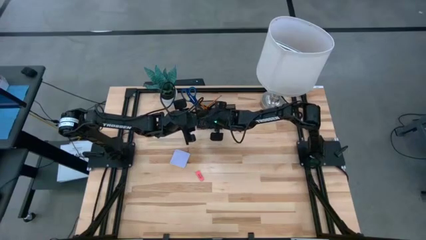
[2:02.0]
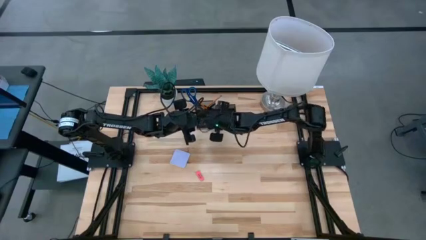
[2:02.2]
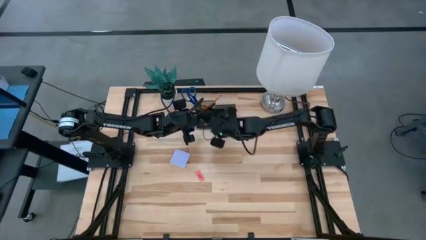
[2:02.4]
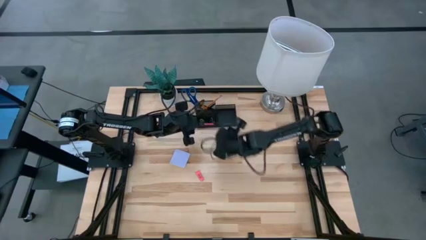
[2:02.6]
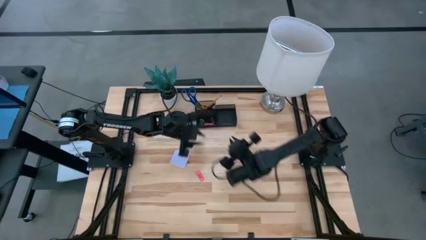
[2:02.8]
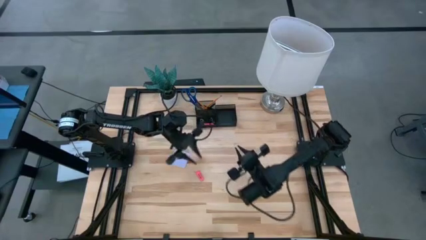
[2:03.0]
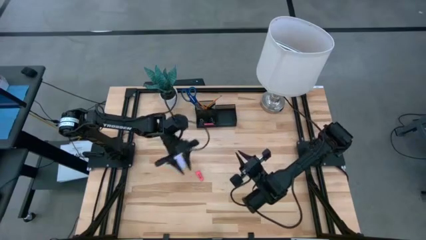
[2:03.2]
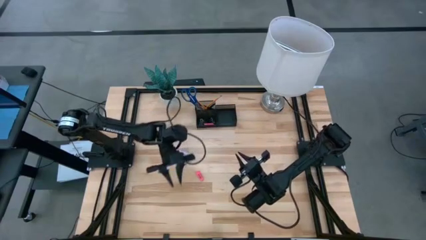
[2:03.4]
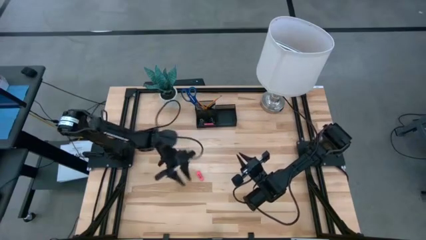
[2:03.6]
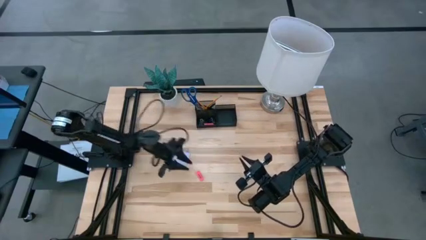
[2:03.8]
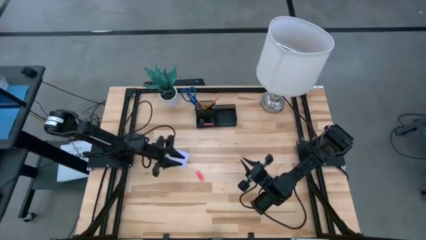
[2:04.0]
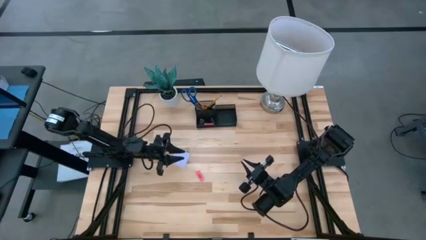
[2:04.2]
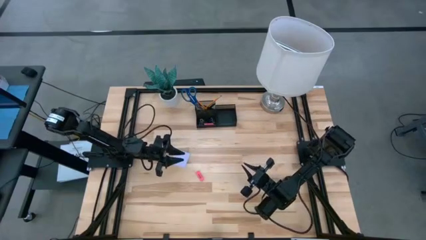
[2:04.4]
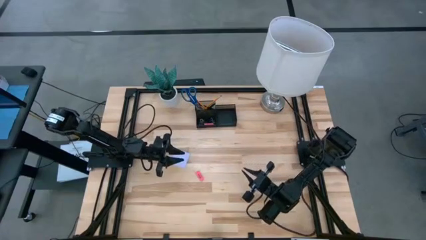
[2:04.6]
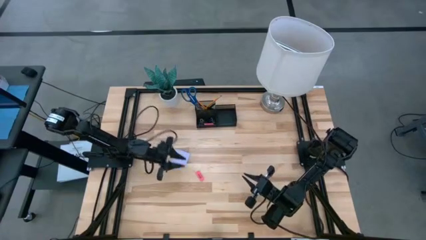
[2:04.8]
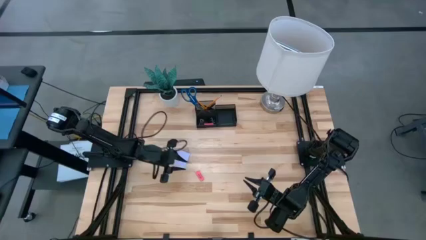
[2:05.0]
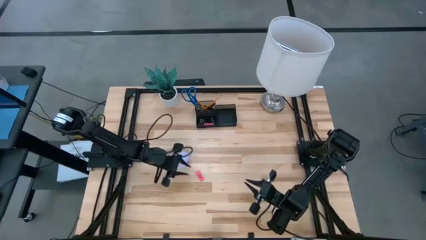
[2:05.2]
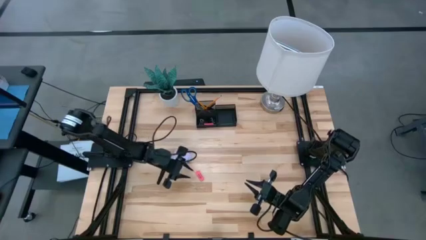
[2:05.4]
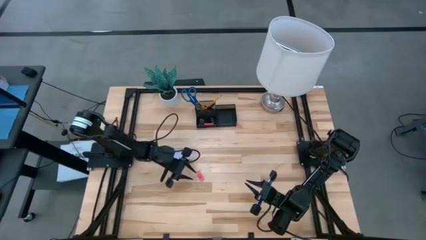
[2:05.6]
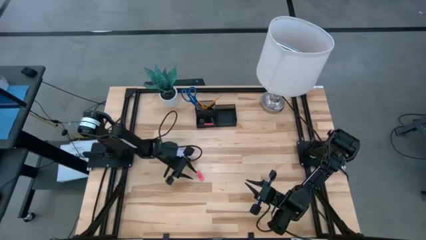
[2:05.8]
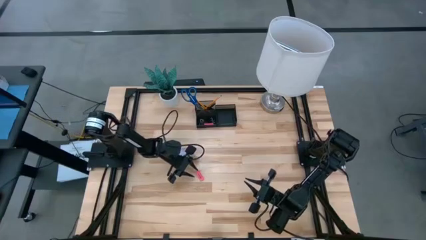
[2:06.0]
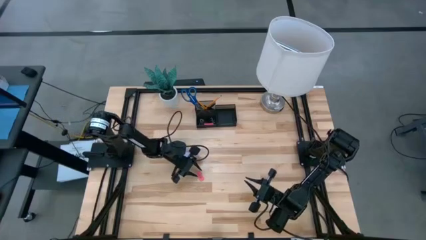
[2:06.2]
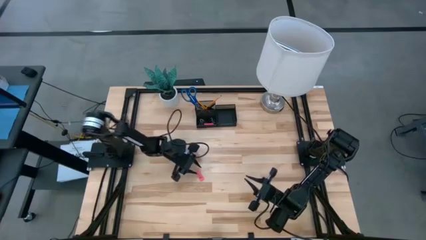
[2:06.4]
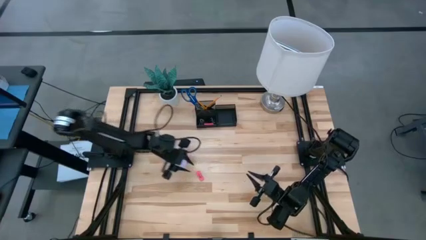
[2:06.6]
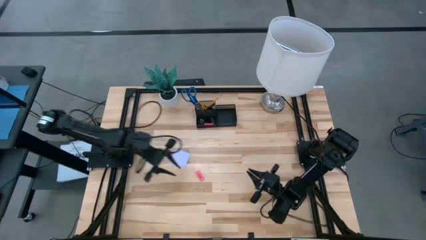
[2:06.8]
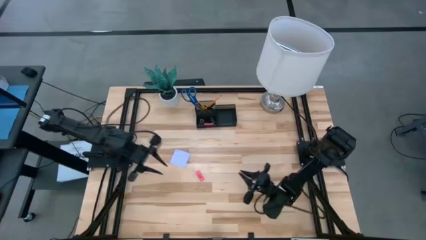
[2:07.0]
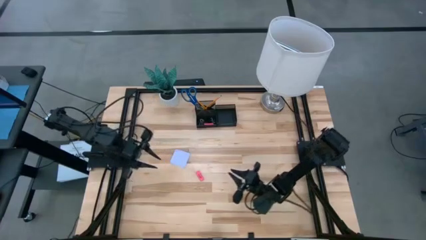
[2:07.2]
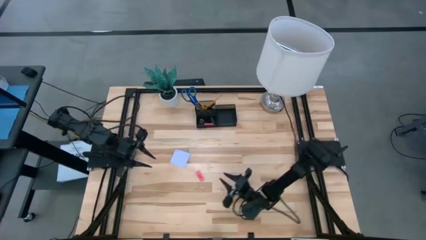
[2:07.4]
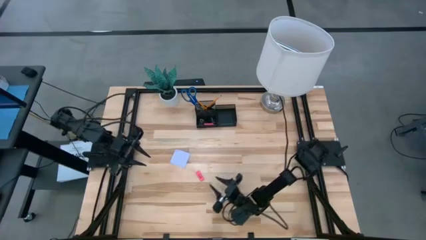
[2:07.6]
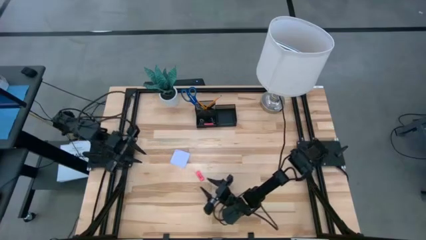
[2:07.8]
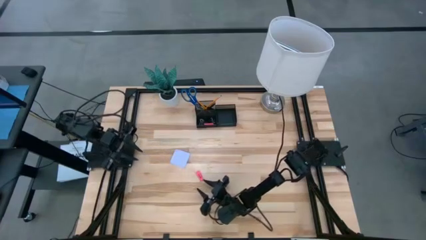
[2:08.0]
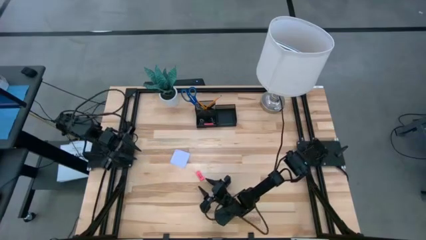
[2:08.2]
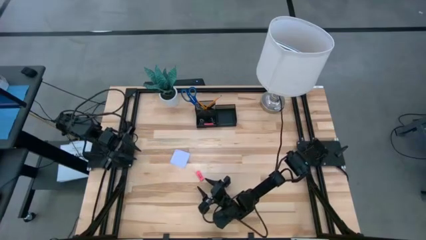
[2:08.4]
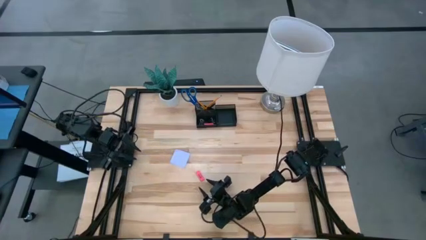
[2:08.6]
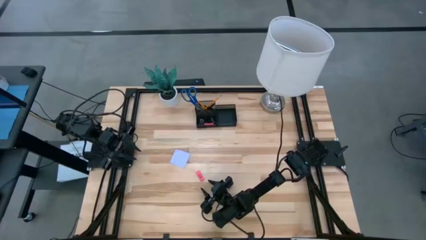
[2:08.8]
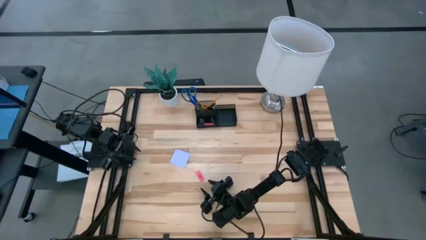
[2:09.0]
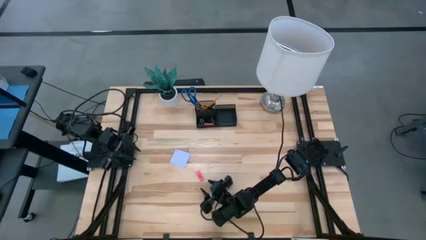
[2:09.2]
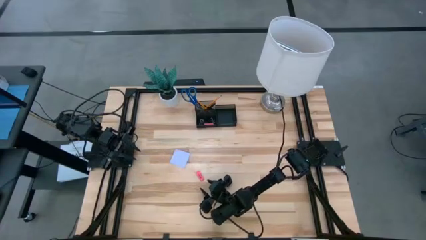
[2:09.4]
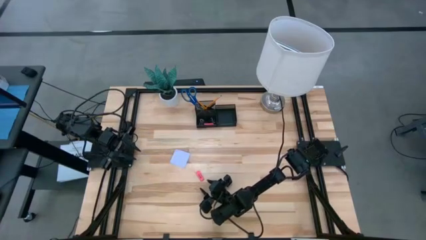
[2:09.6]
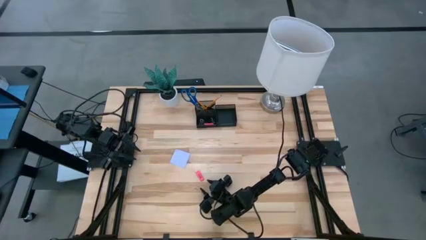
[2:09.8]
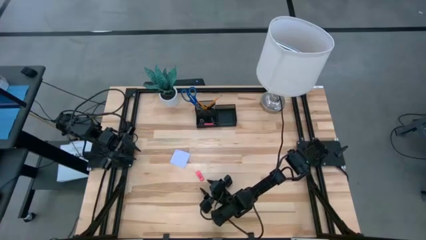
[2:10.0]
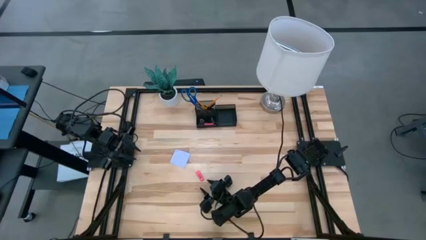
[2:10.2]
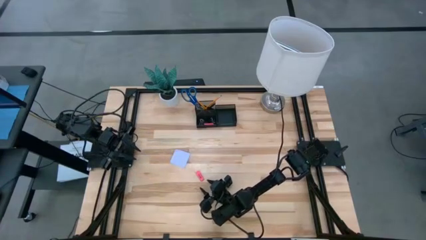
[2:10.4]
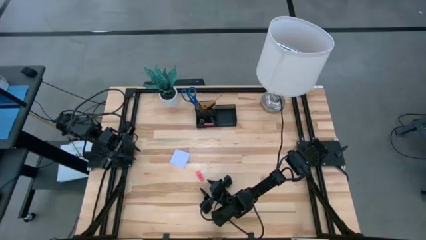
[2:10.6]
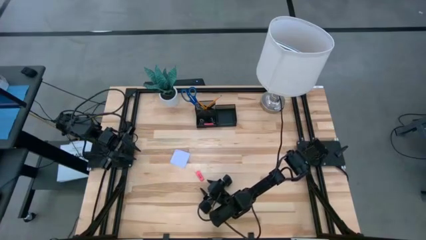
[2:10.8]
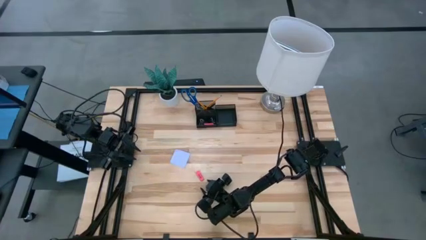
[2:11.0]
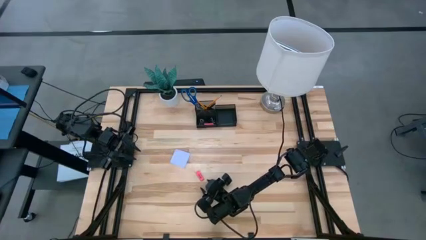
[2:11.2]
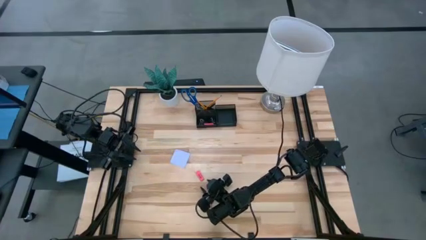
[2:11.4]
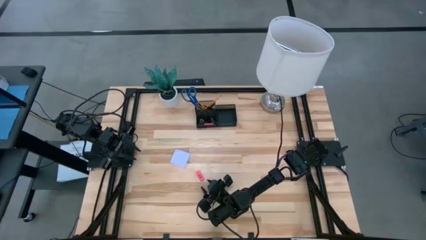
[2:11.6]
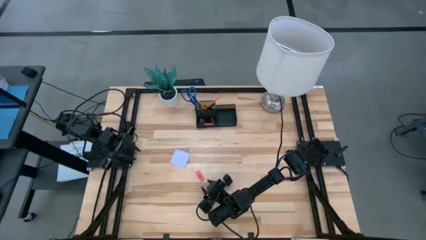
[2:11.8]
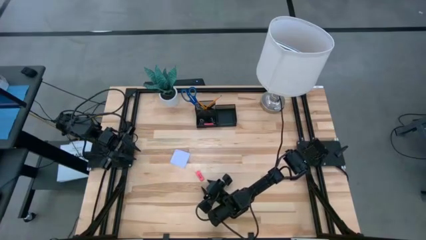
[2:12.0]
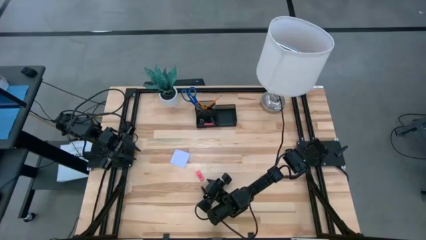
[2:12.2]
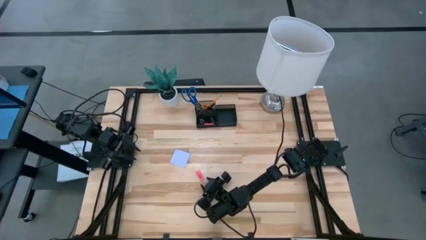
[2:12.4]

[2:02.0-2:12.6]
Task: Pick and place office supplies into organizer
Put the pink eraser into the desk organizer

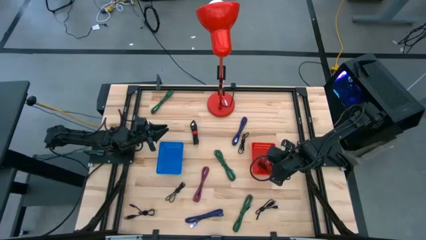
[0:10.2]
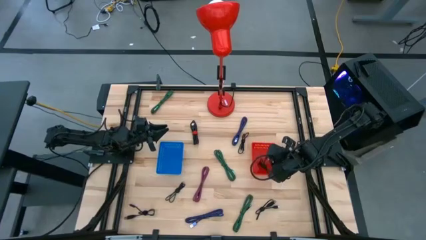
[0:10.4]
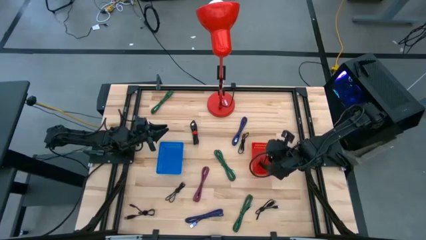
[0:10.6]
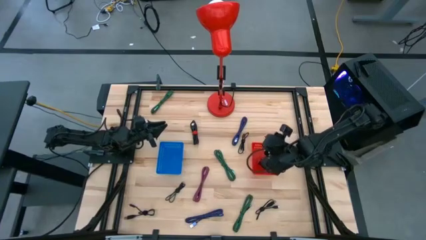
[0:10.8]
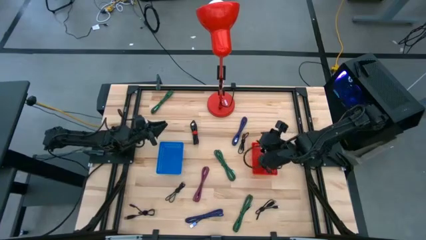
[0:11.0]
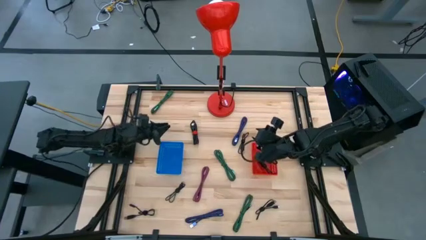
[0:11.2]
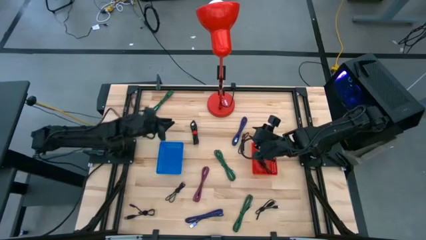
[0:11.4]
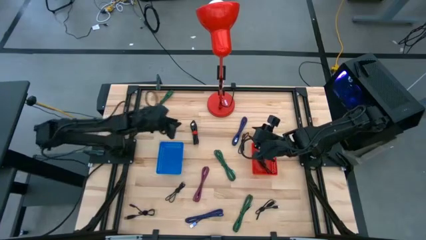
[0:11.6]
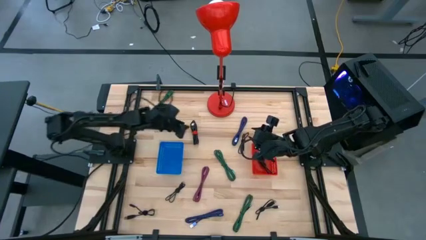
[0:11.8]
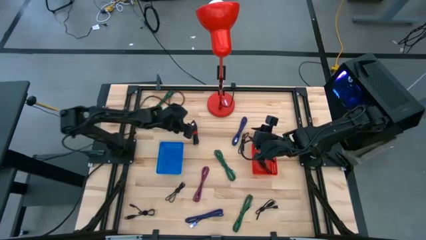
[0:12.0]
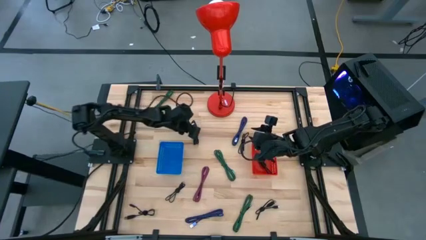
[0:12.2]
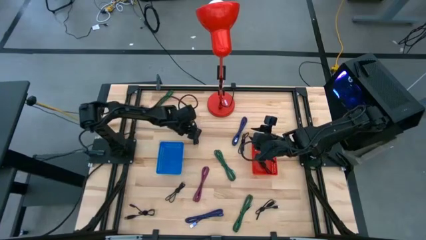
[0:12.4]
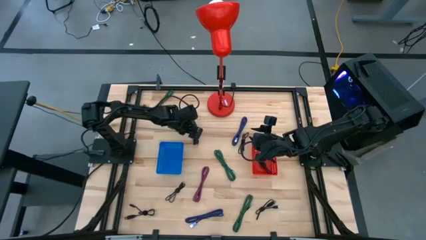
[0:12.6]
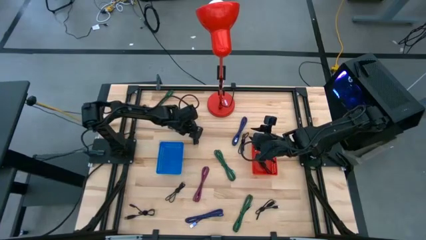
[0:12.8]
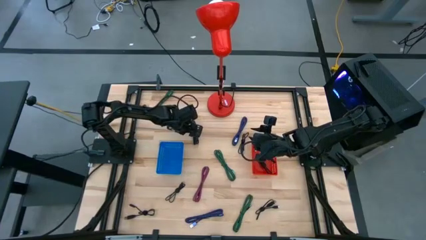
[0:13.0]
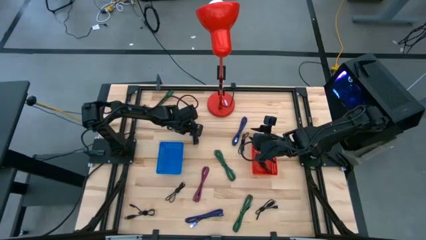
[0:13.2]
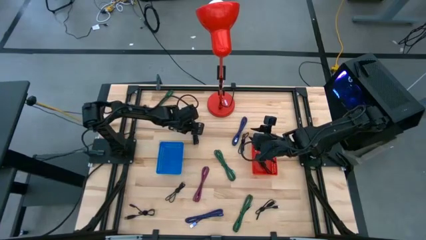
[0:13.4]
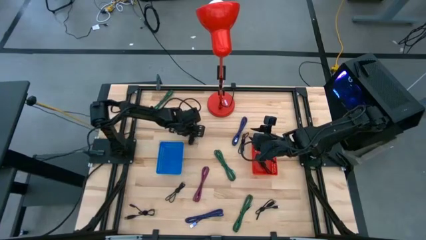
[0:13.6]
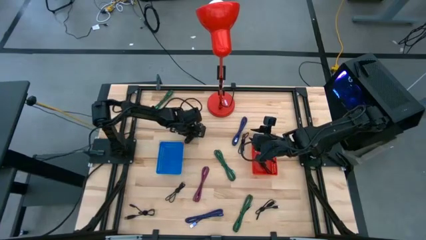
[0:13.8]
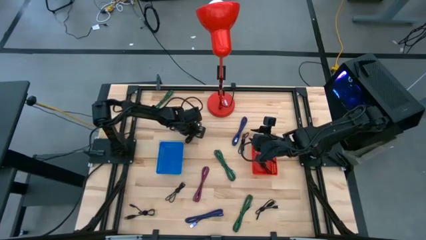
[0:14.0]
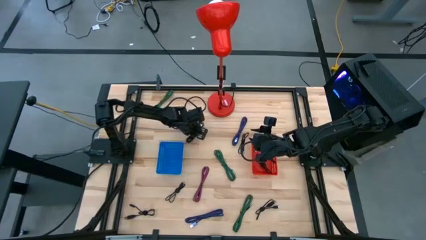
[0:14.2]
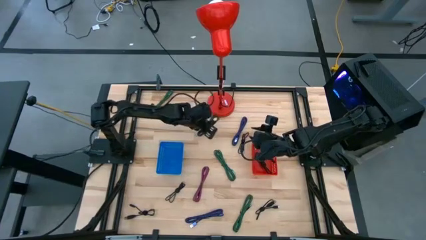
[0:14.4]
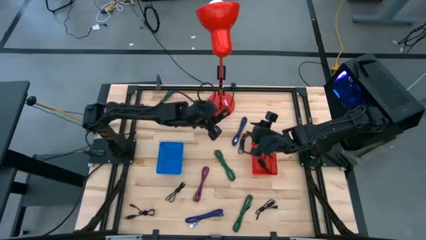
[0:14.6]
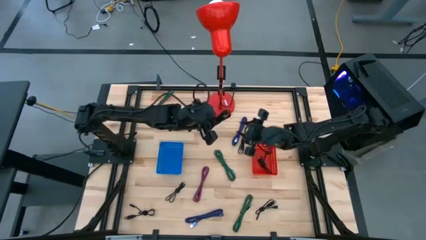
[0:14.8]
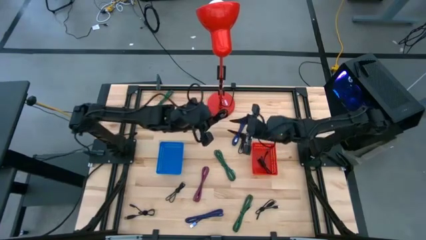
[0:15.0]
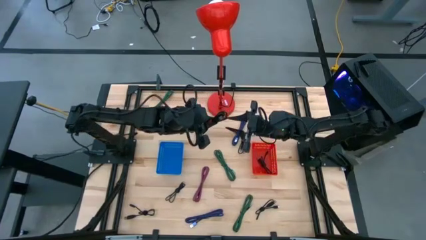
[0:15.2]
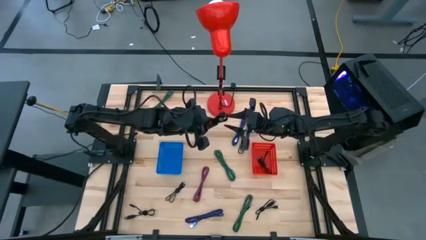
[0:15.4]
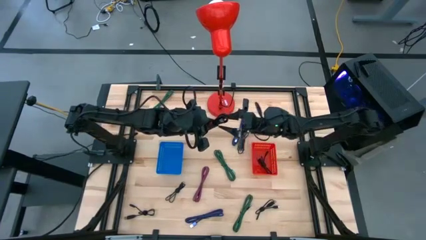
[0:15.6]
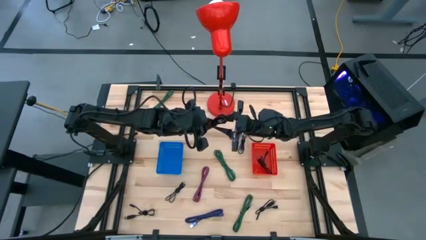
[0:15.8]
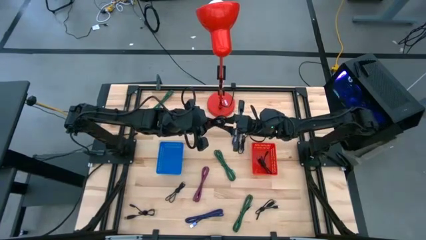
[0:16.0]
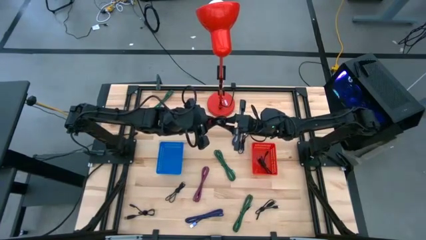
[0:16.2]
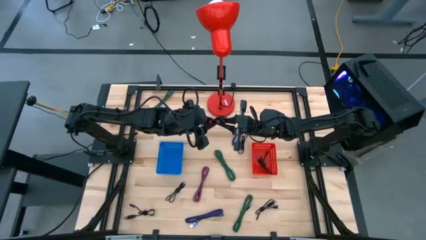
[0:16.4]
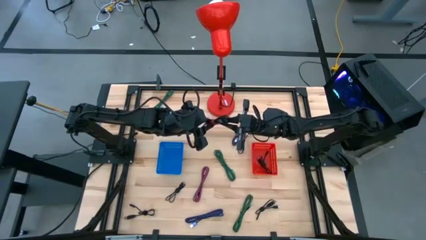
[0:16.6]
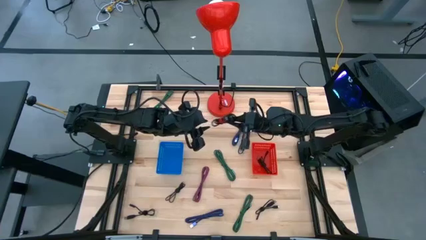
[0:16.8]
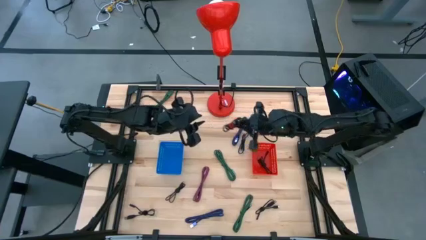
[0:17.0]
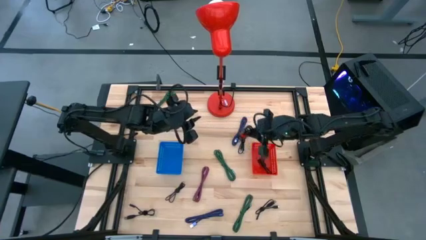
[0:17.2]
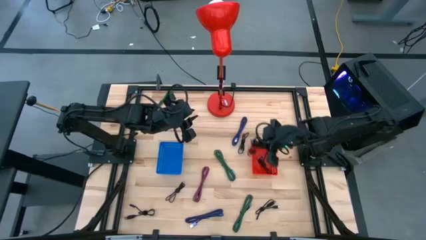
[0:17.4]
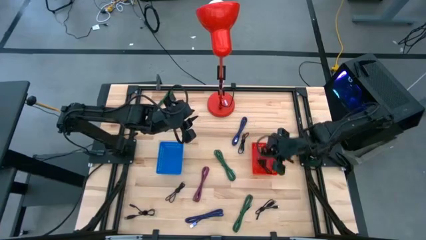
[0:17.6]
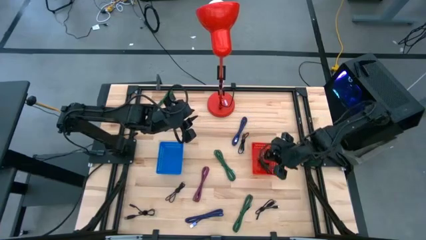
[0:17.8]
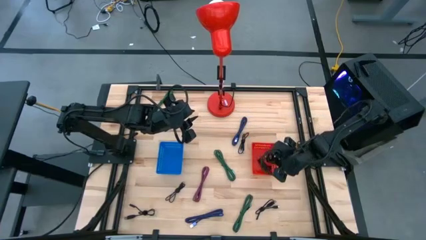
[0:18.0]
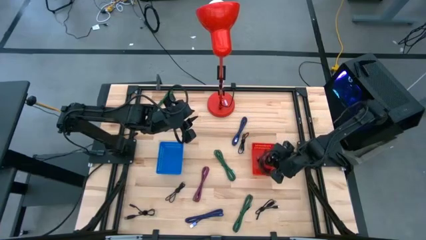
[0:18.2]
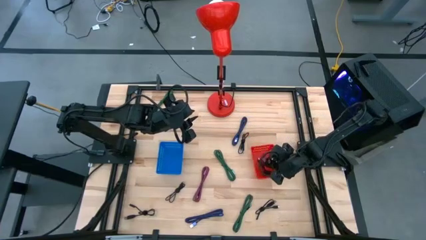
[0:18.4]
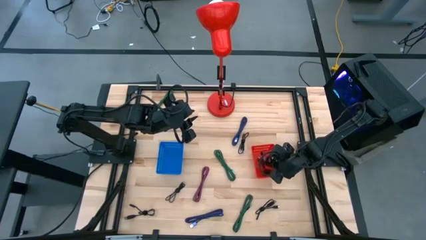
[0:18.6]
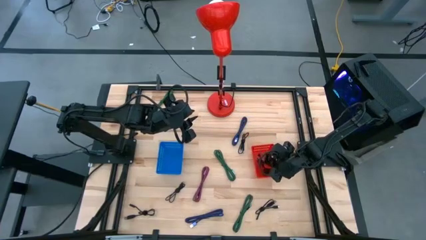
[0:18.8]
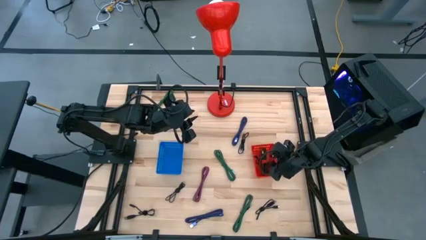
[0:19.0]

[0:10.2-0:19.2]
Task: Pick & Place USB Port
Put the black charger cable into the red bin
